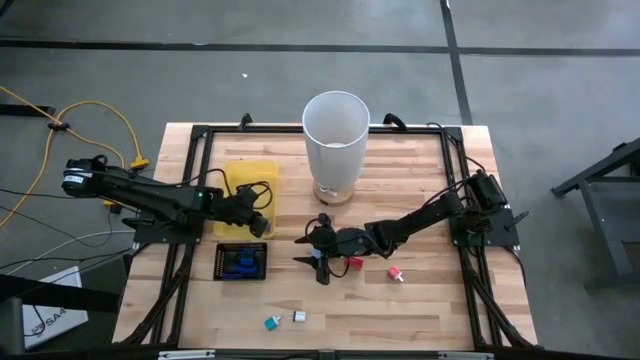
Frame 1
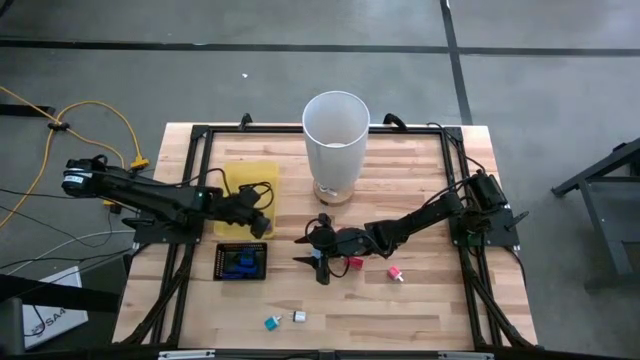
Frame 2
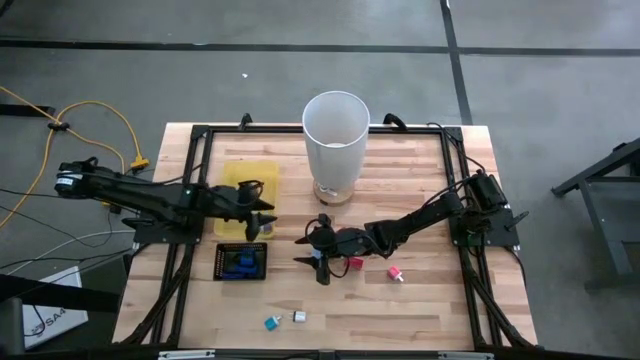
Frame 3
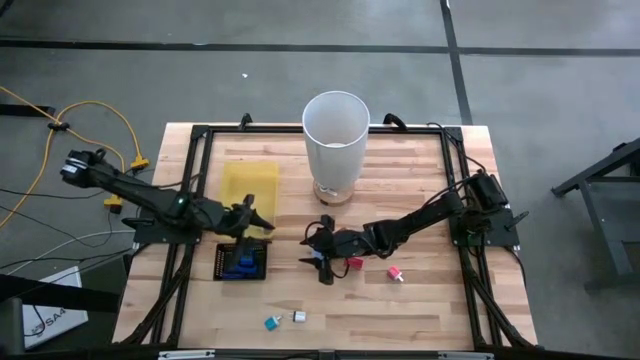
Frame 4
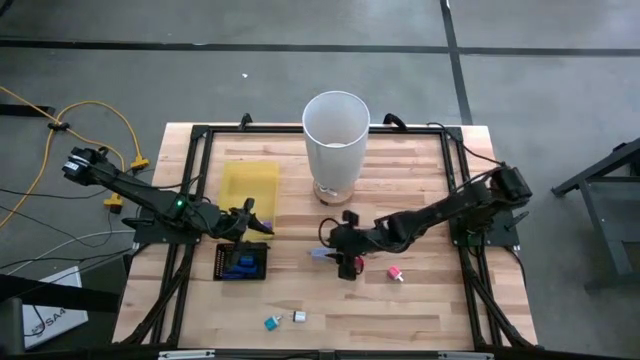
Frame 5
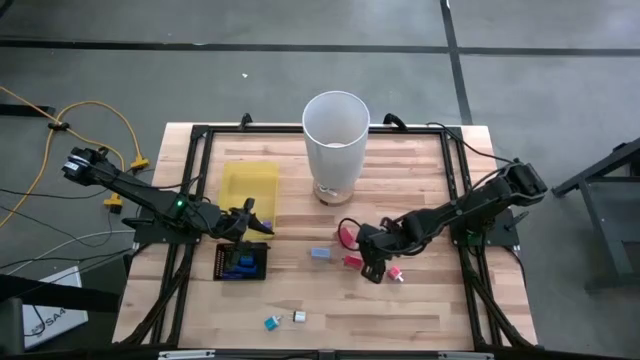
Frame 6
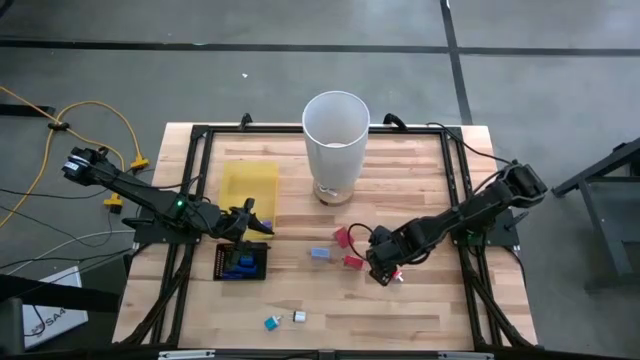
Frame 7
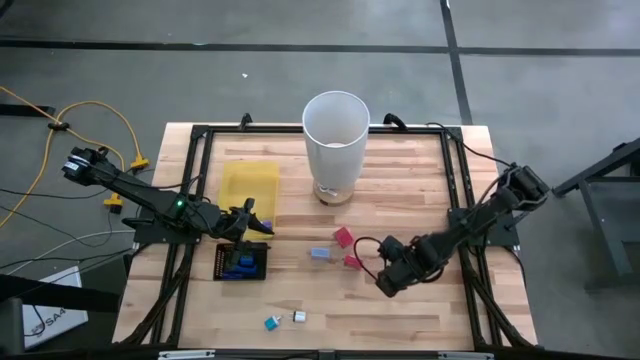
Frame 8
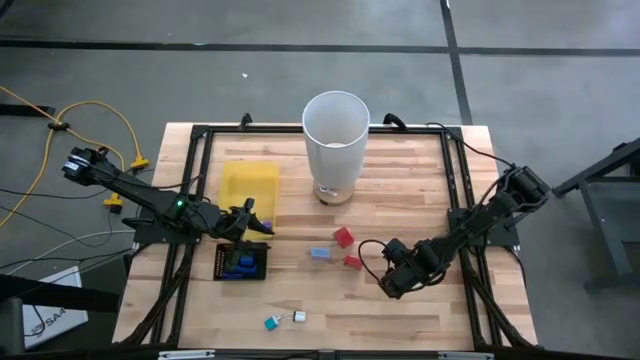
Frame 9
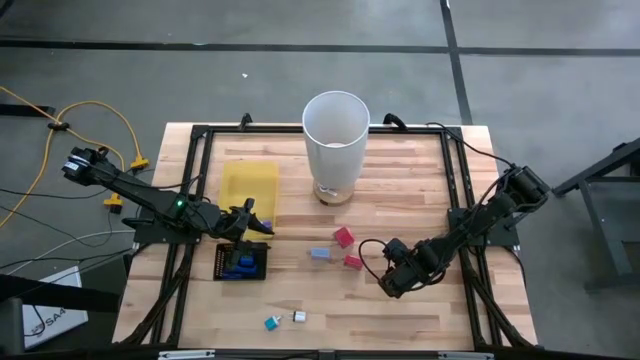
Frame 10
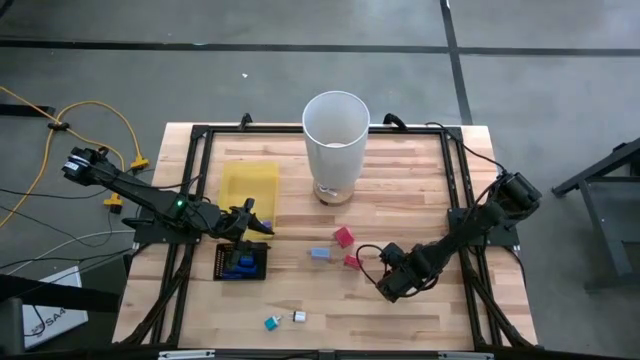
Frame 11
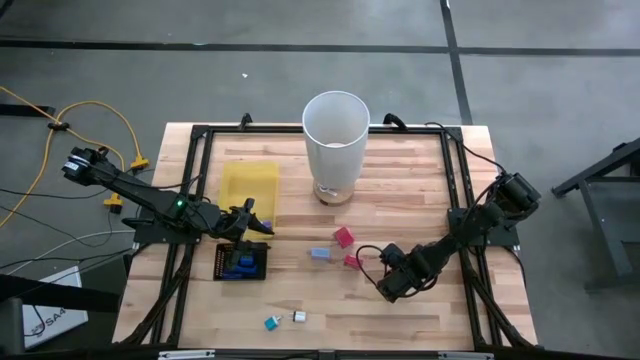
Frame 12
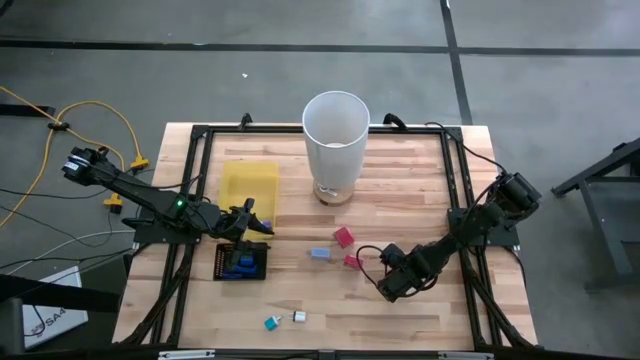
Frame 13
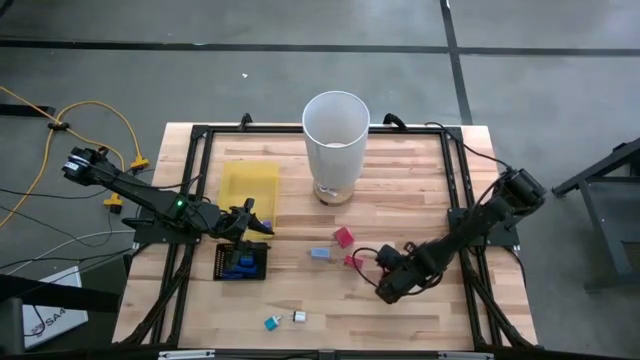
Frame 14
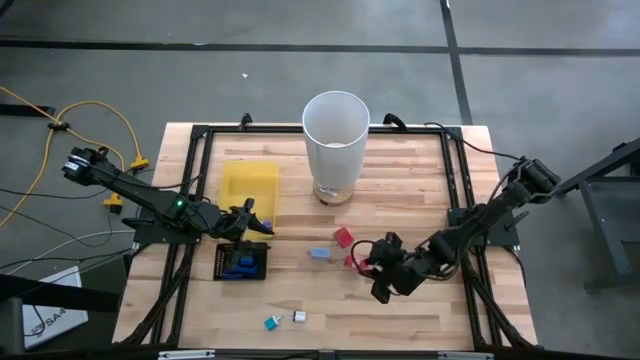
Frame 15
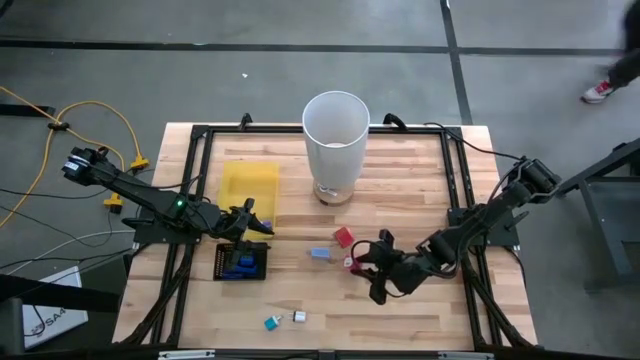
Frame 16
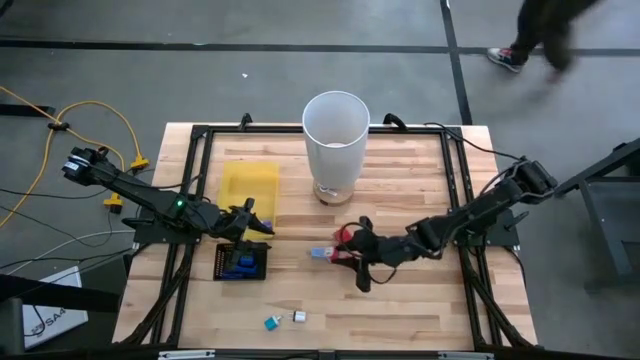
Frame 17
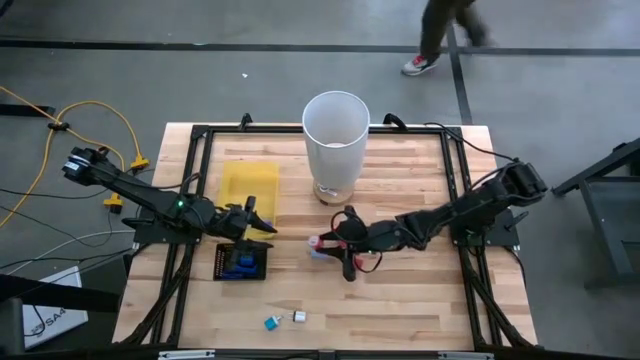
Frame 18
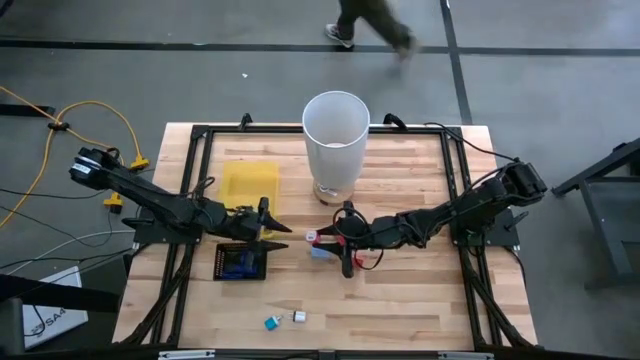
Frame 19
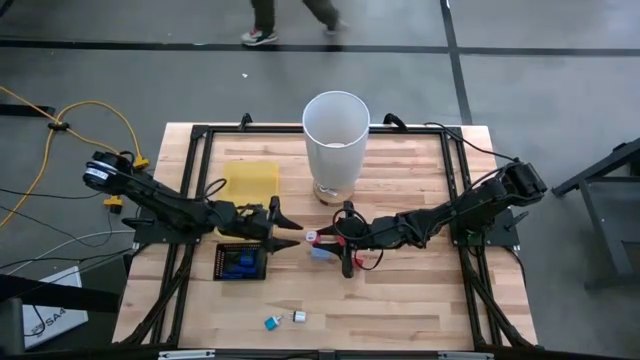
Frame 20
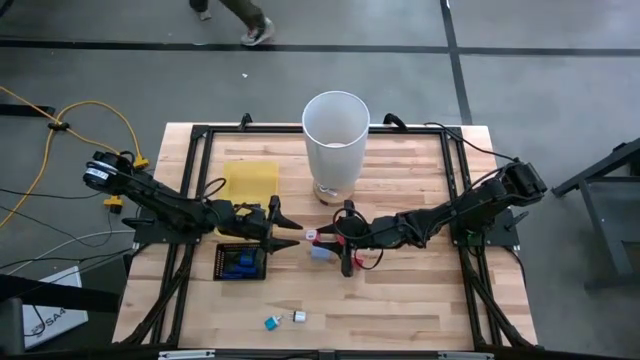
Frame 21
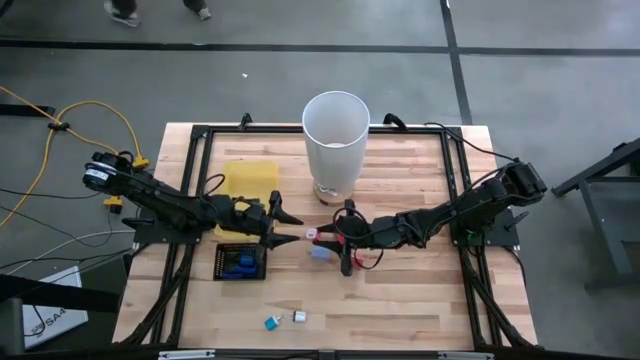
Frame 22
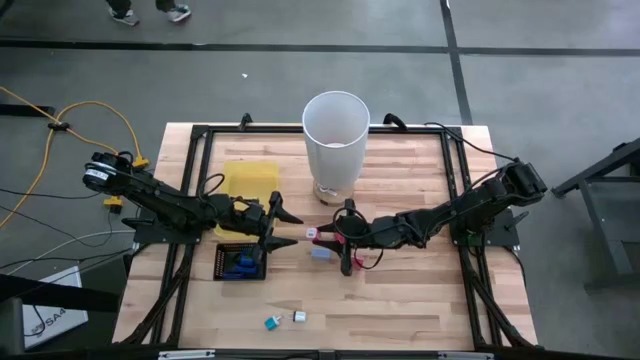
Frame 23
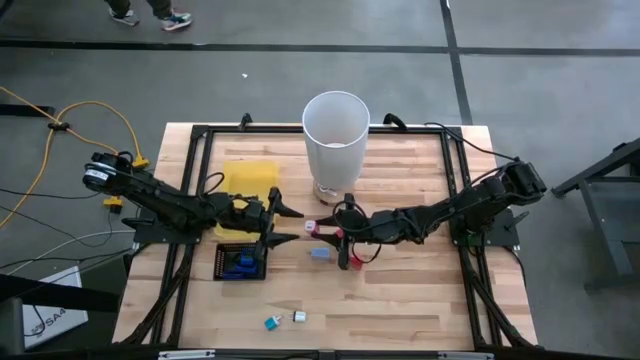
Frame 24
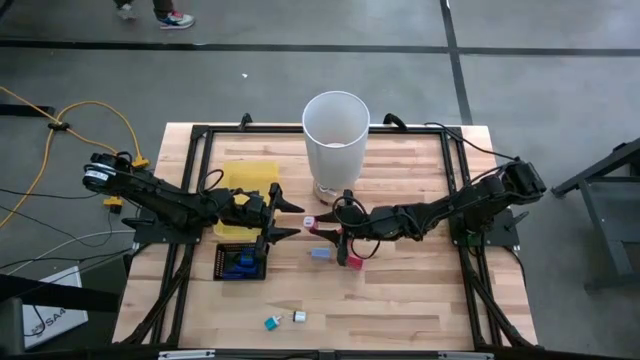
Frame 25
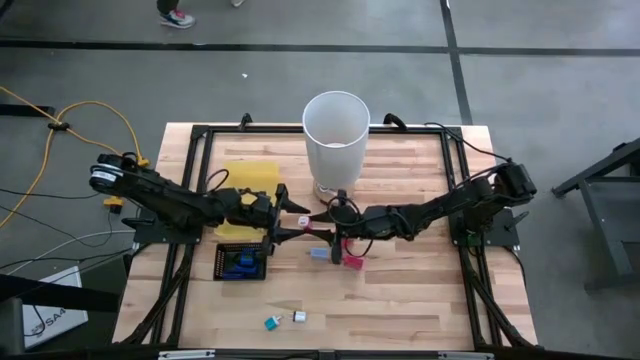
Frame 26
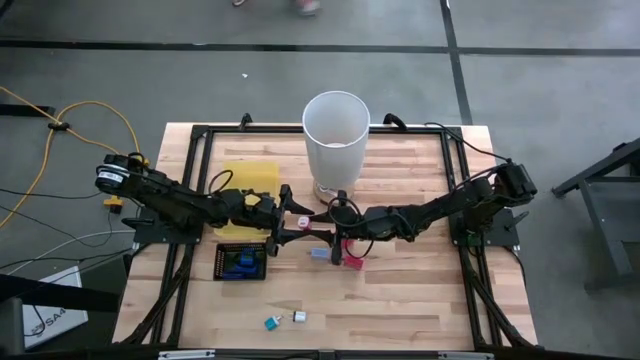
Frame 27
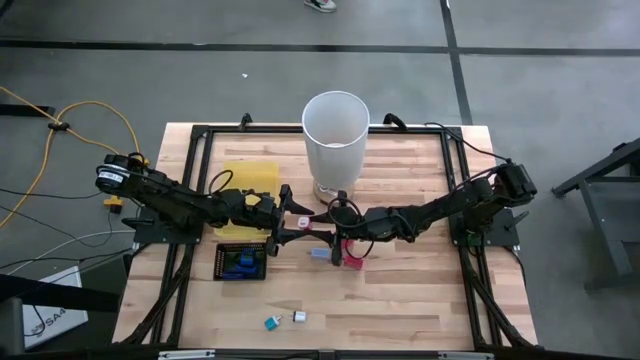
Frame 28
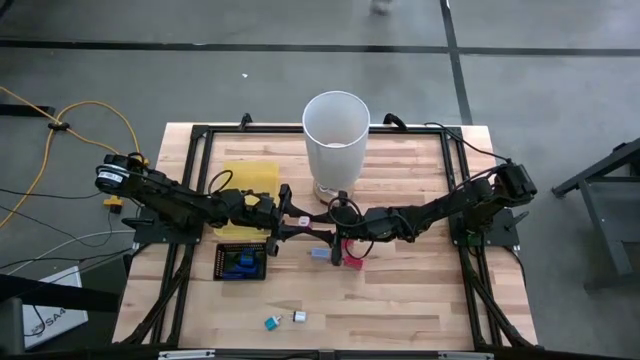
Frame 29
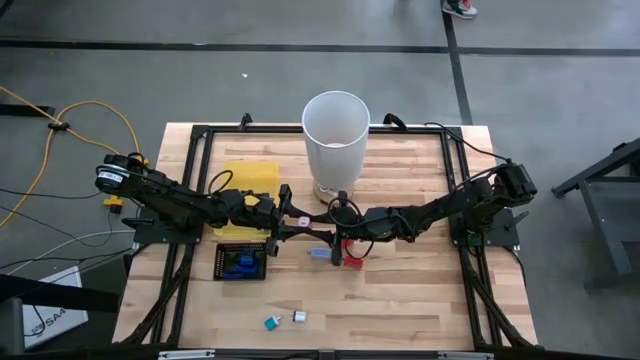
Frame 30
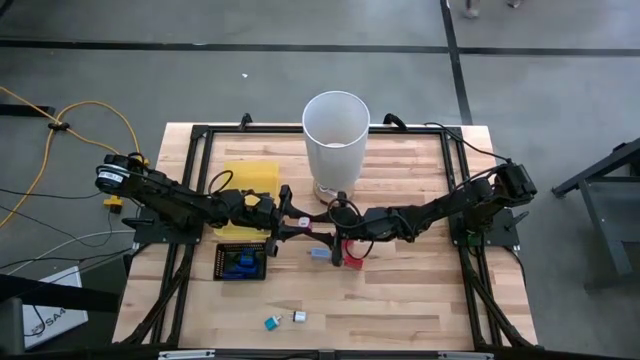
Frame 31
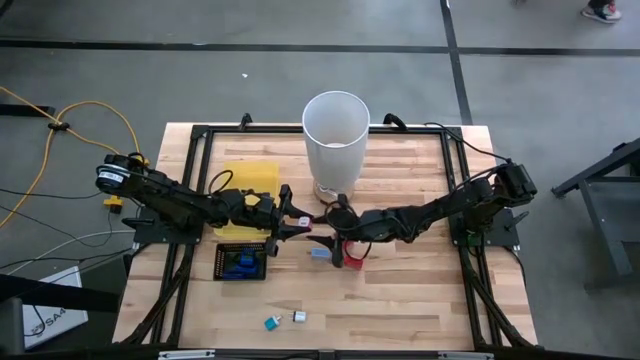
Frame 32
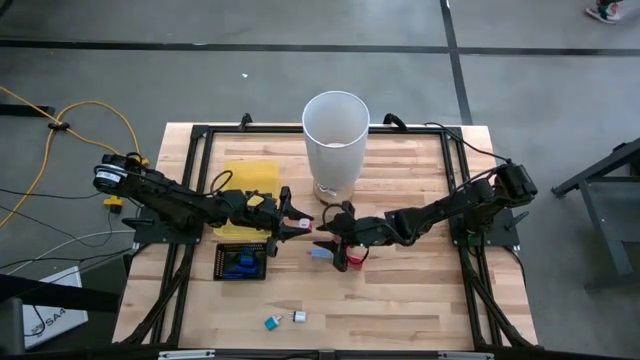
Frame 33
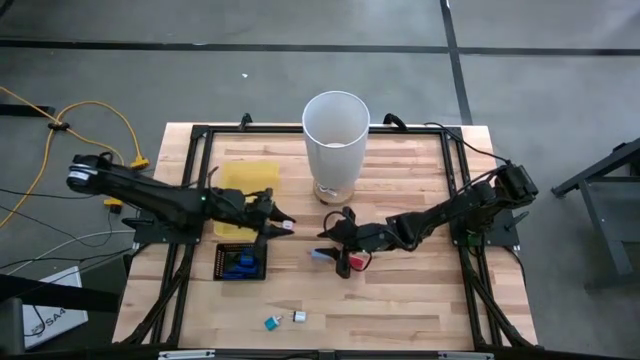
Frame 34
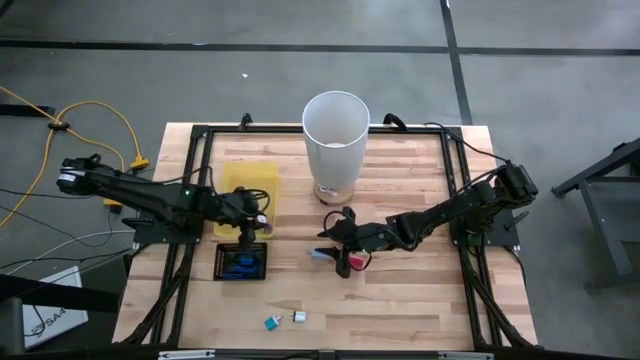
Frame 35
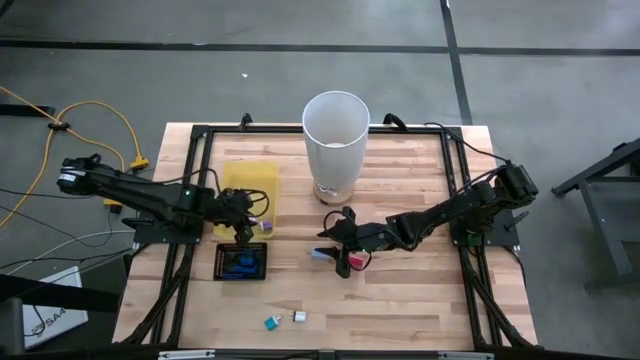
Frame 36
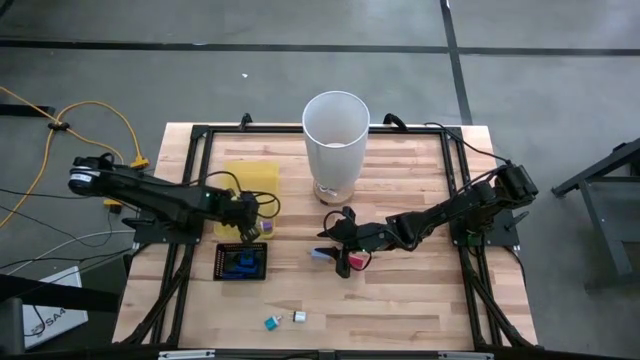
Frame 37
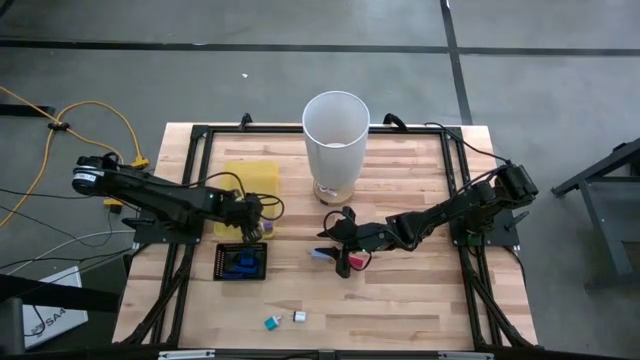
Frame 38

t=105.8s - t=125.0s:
Task: Pick & Place Office items
Put the pink charger adapter into the yellow bin

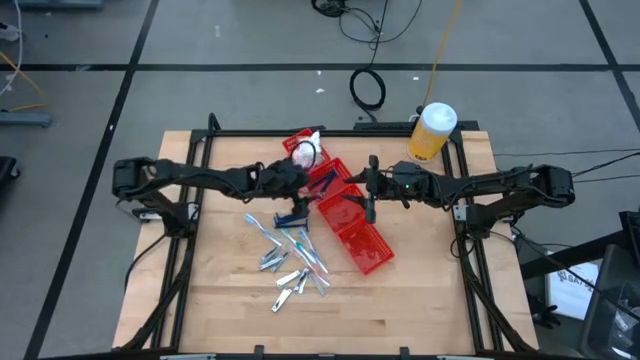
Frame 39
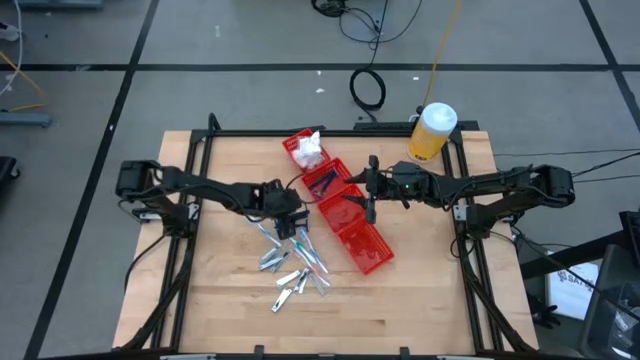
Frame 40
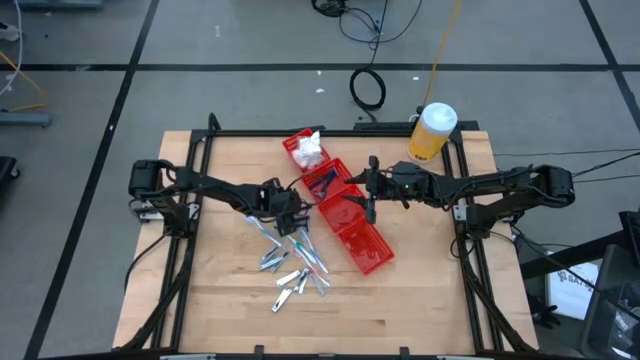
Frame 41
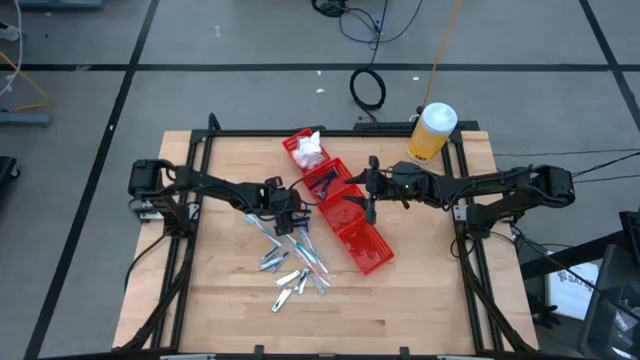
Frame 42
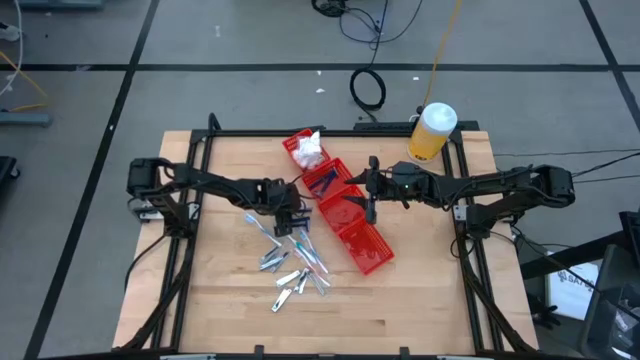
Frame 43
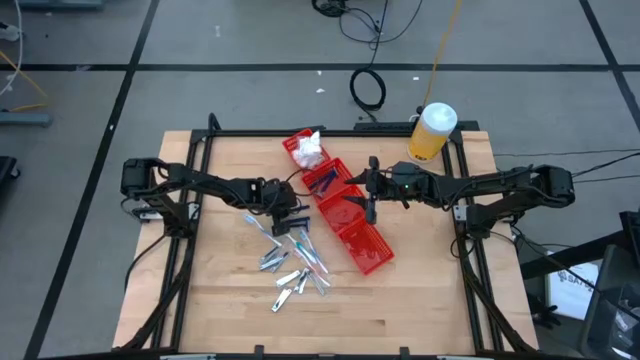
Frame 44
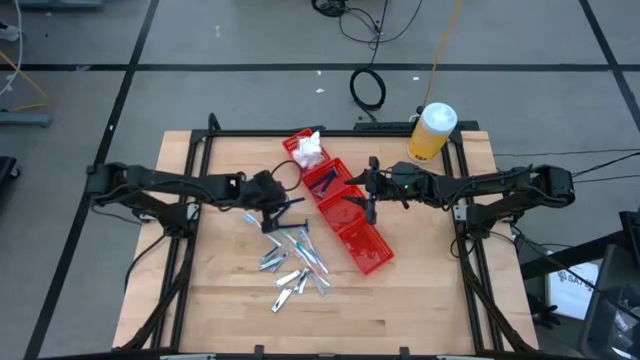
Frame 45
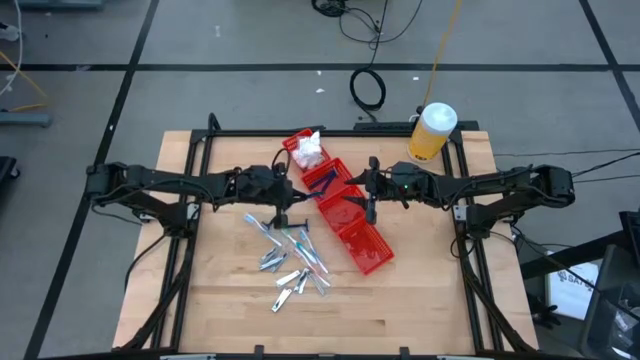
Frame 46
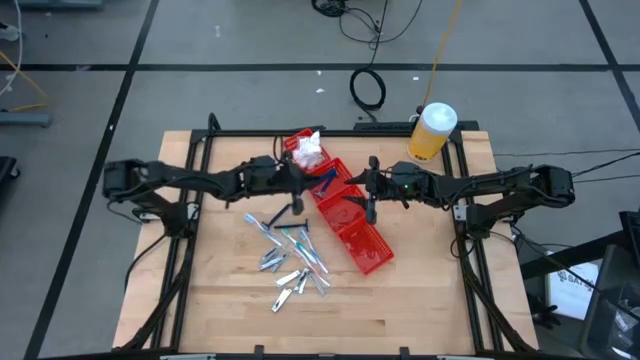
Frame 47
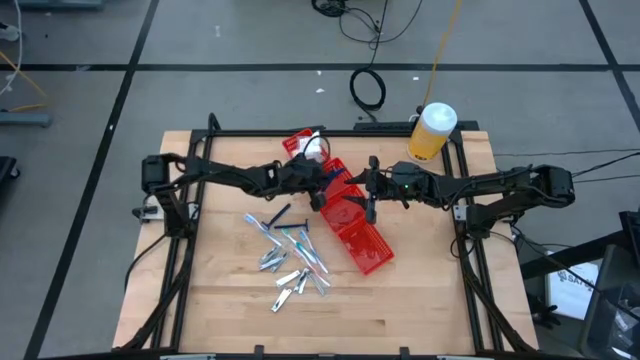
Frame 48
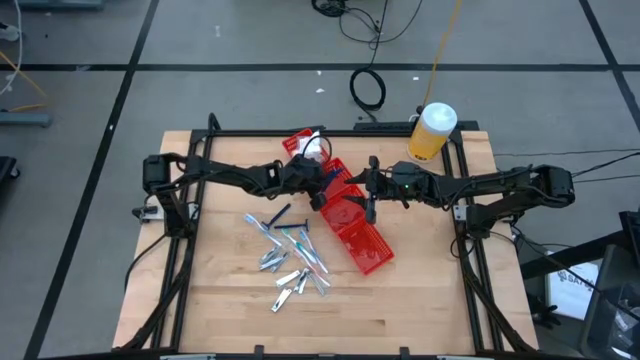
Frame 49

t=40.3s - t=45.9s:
Task: Pick & Place Travel size toiletries
Put the blue razor into the top middle red bin
